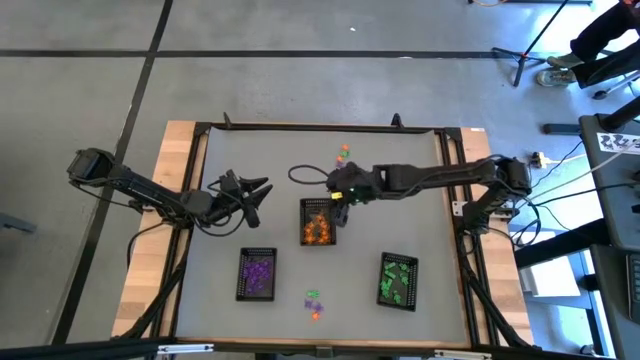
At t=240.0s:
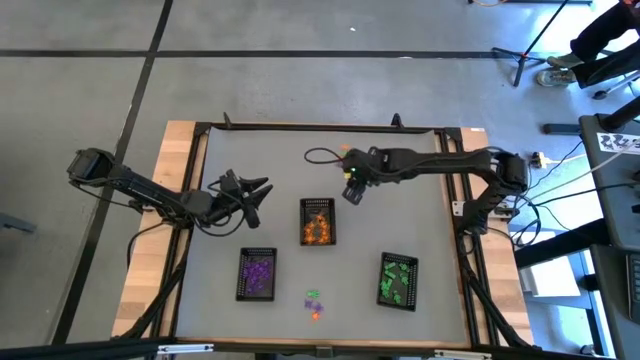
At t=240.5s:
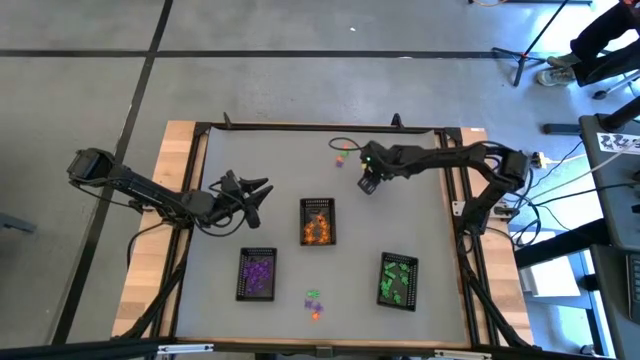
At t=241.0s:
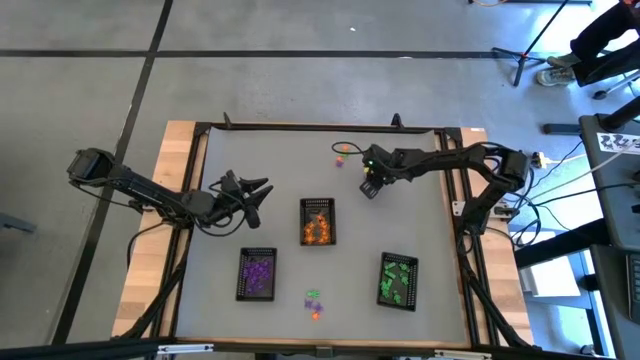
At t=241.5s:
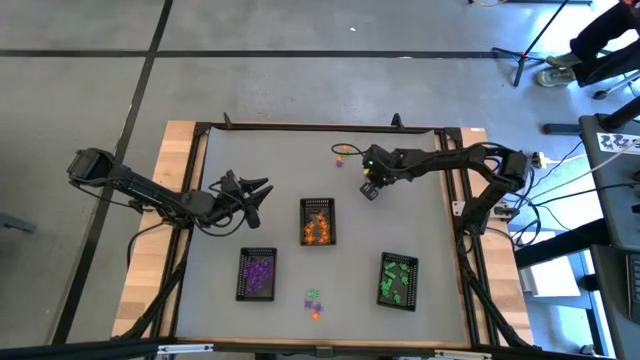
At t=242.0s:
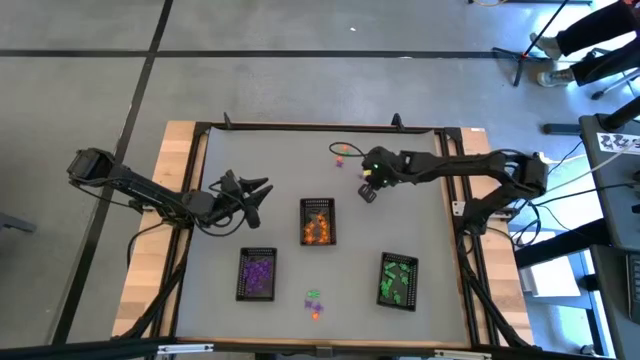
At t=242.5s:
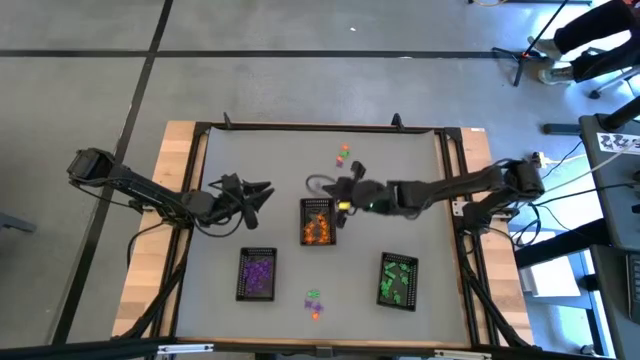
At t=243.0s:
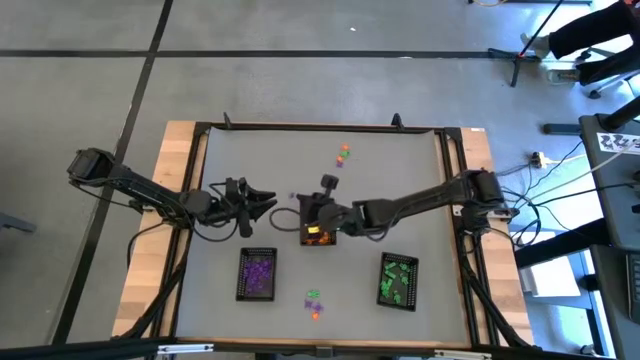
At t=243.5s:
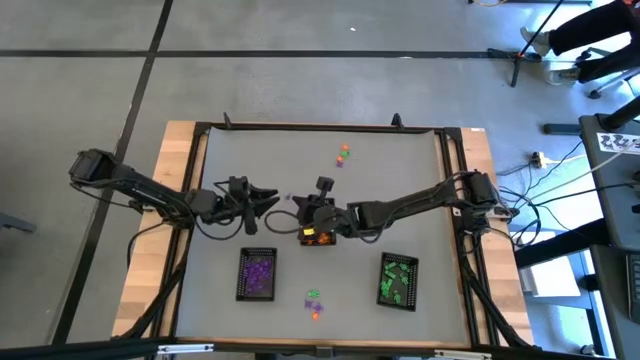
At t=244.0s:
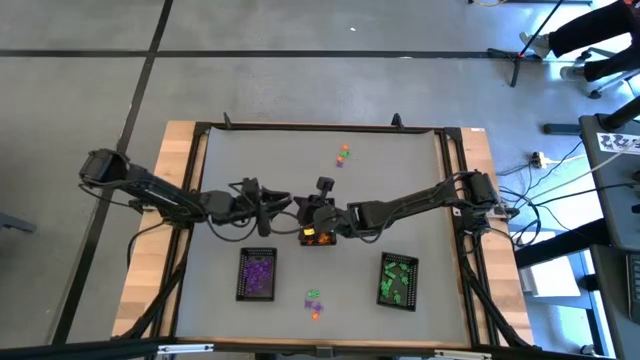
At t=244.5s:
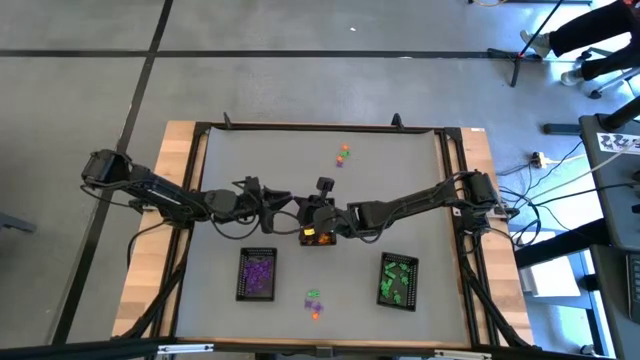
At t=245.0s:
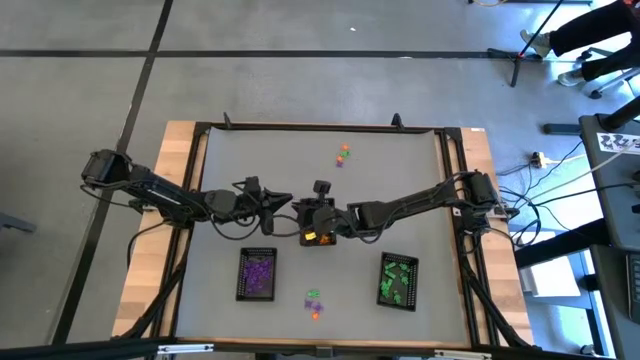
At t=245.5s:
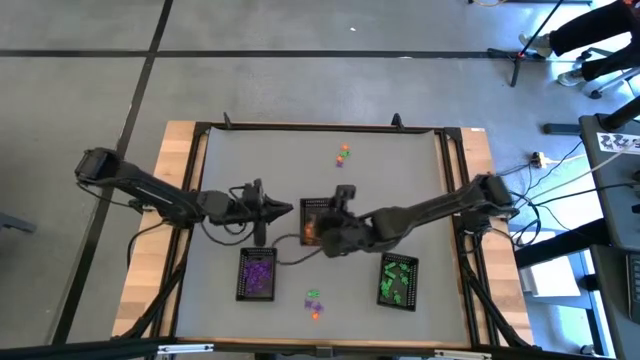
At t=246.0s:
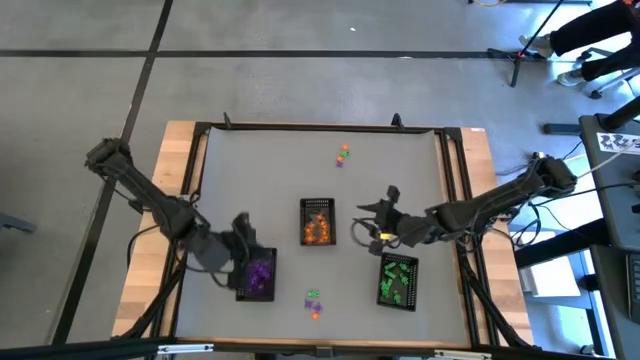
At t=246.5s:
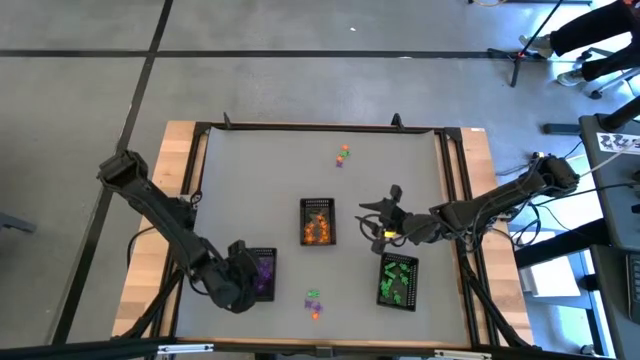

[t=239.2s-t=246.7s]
Task: Sort Halloween decoration
Put the violet spider toy into the bottom left black bin

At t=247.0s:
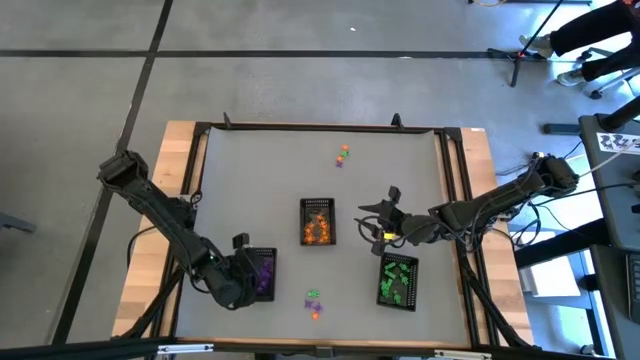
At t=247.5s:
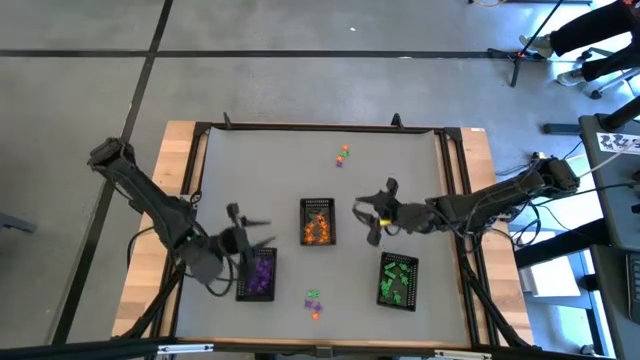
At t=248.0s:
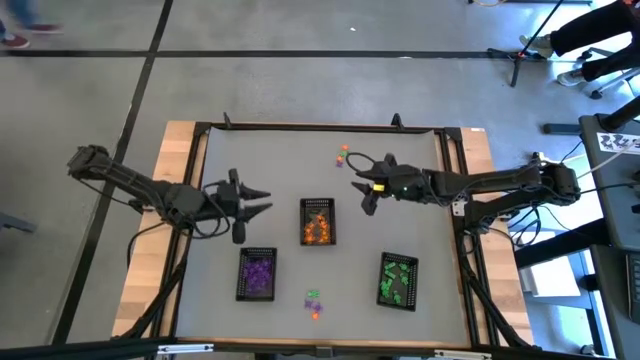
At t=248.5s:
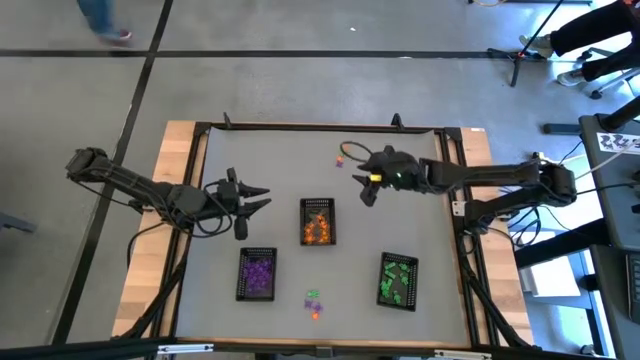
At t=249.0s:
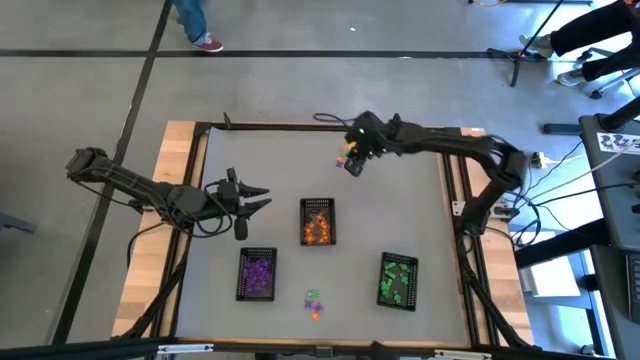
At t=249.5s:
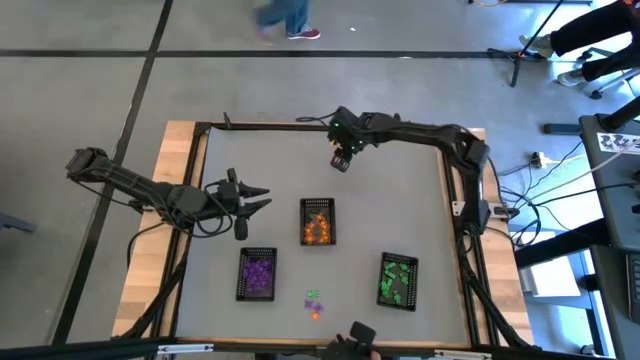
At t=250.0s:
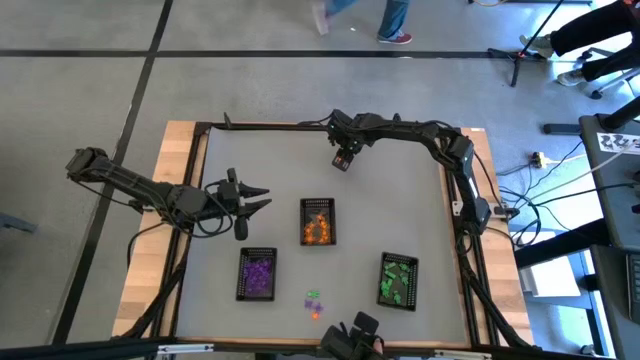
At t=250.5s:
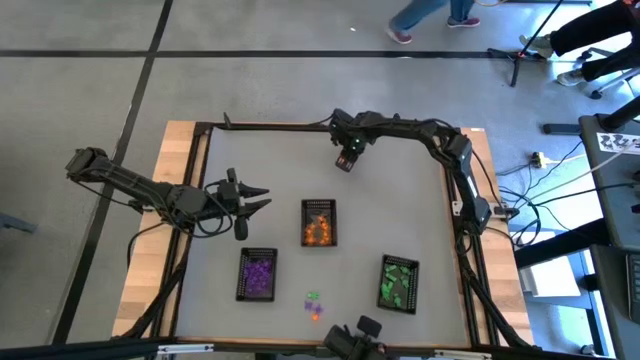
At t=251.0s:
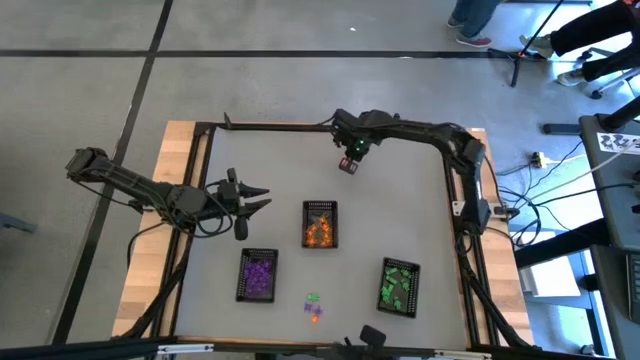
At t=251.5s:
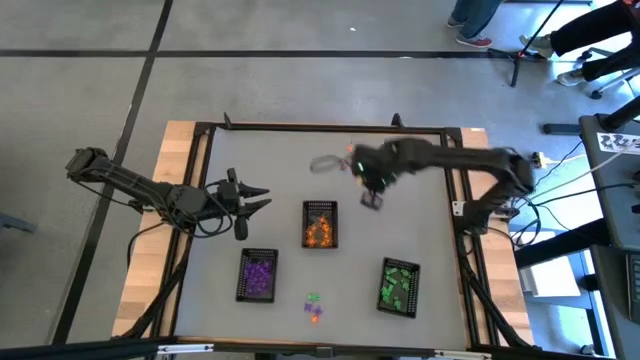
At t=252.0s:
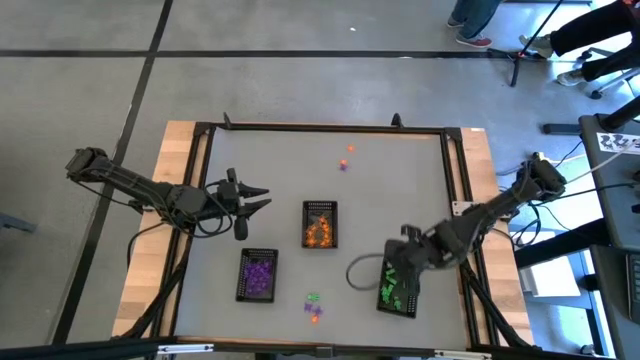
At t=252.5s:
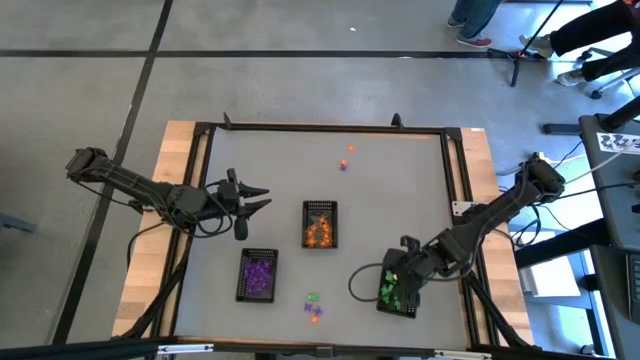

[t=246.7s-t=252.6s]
Put the green skeleton toy into the bottom right black bin

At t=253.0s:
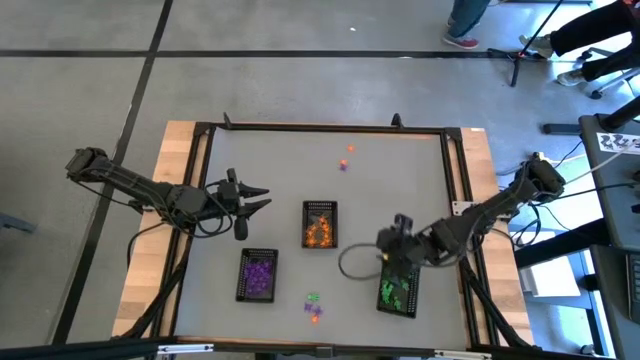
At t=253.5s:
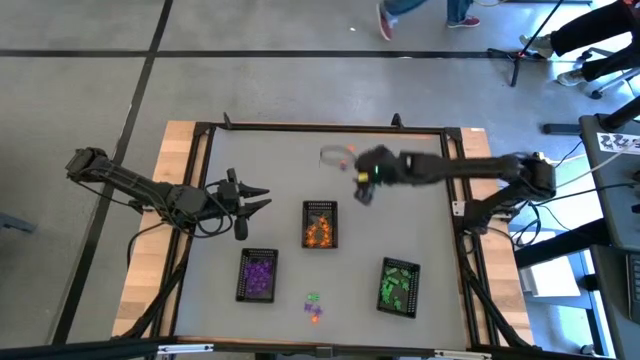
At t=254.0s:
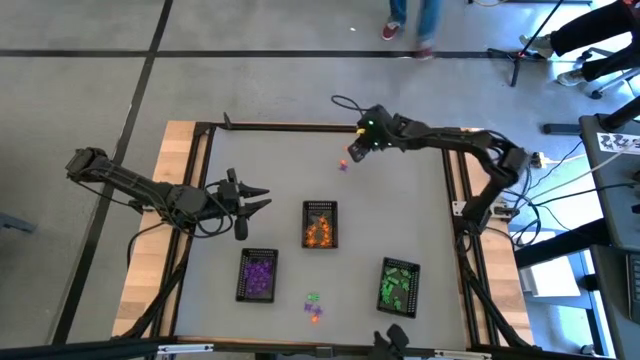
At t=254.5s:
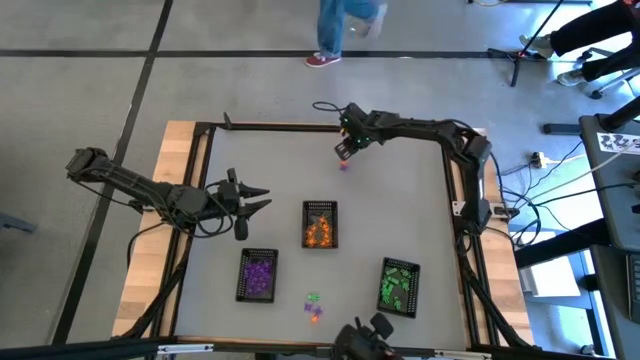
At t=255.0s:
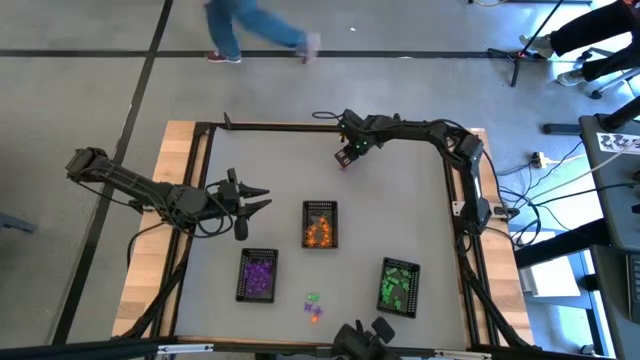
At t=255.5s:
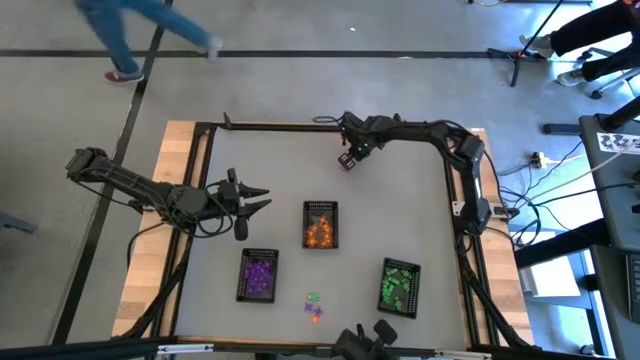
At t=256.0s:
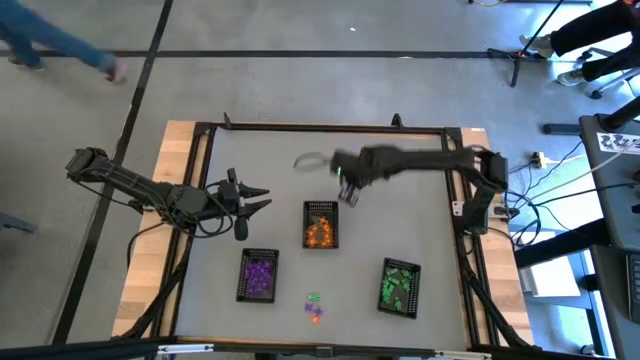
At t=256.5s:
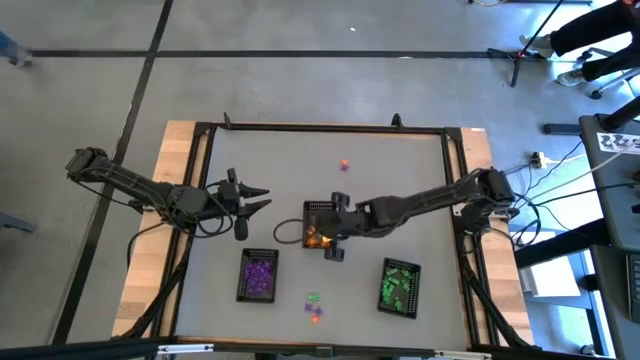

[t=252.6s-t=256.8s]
Put the orange spider toy into the top black bin

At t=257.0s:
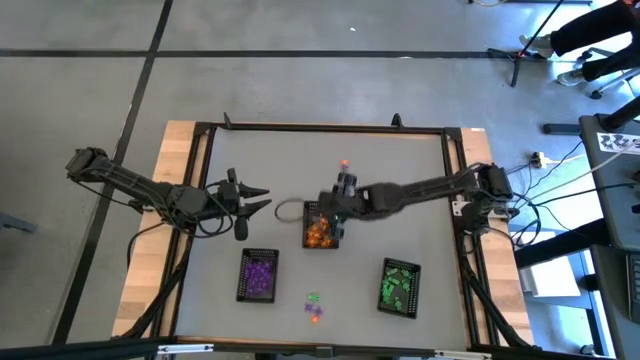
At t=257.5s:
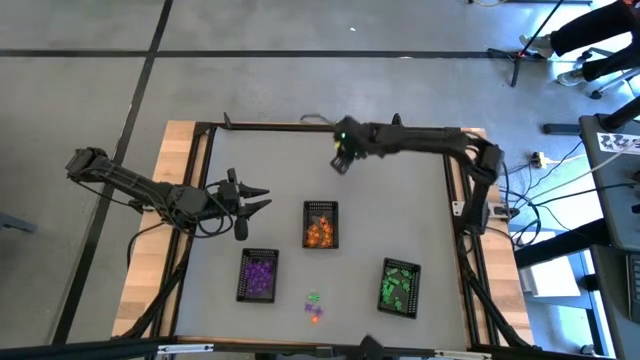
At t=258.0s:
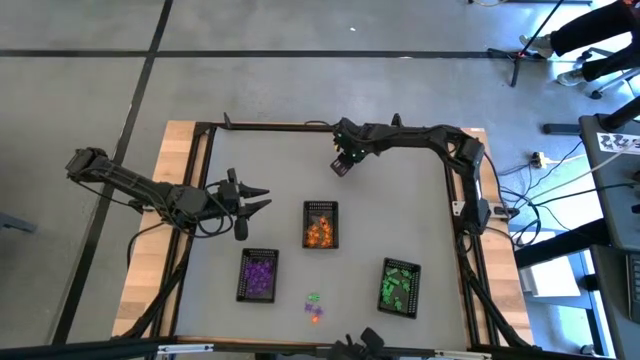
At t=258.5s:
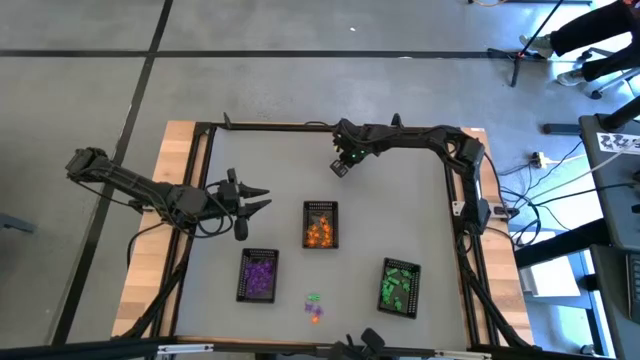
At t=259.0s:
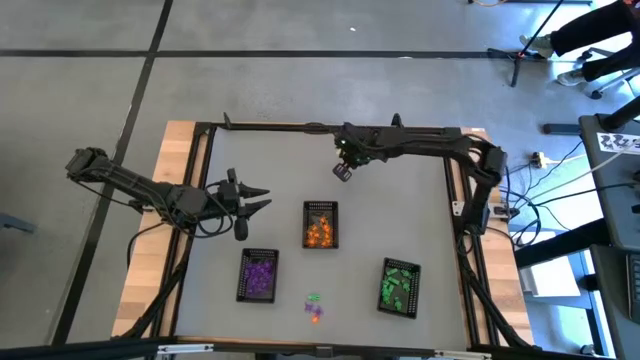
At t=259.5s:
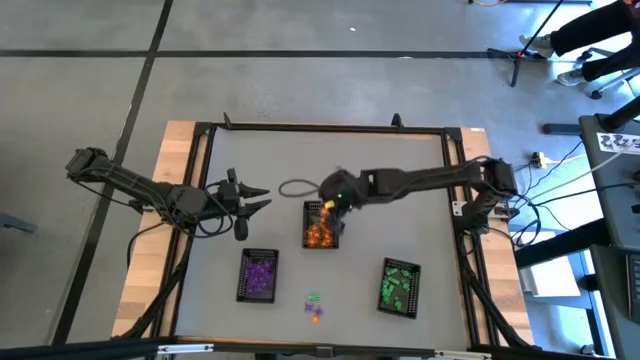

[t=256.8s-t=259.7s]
Put the orange spider toy into the top black bin
